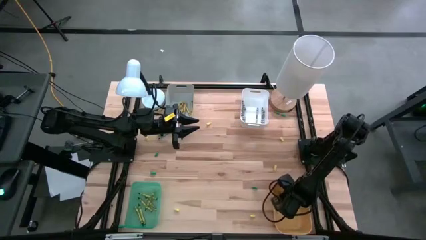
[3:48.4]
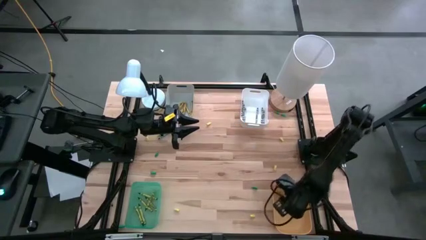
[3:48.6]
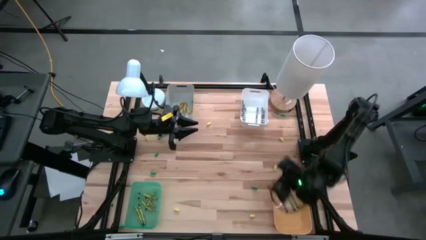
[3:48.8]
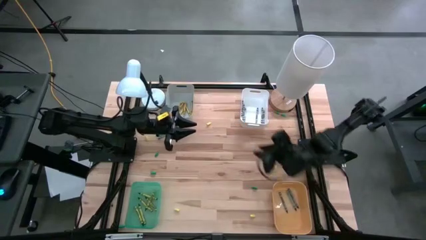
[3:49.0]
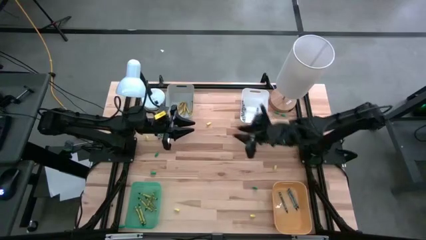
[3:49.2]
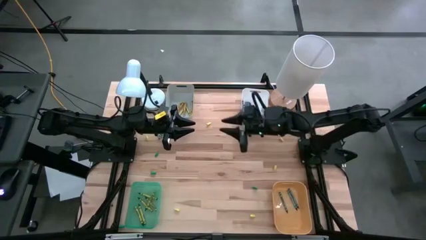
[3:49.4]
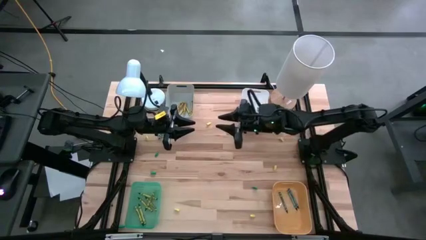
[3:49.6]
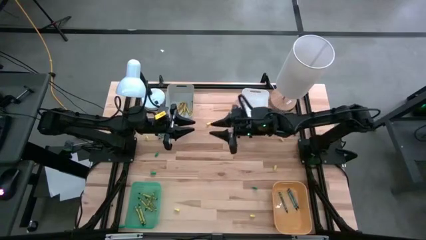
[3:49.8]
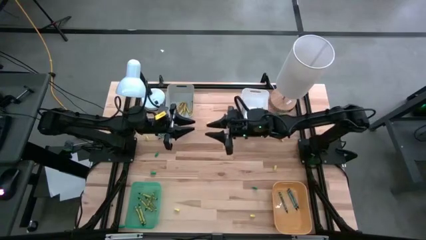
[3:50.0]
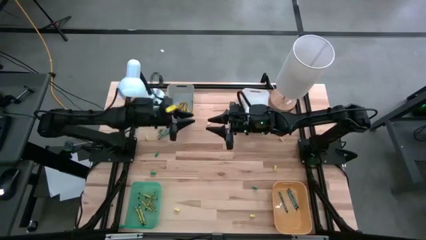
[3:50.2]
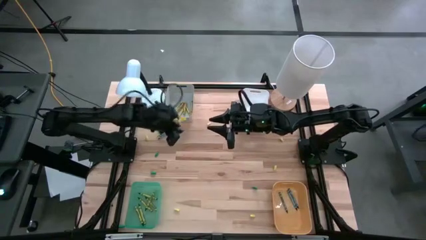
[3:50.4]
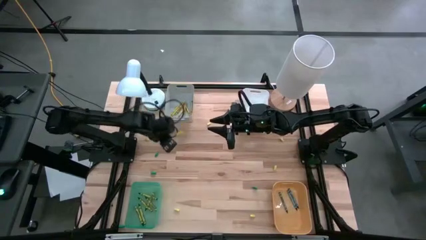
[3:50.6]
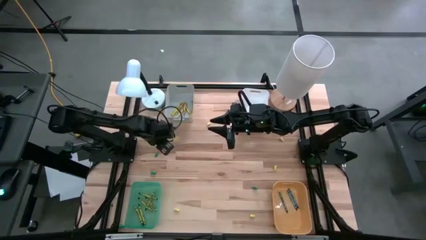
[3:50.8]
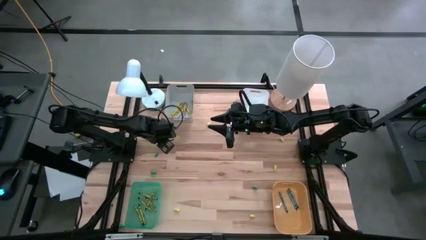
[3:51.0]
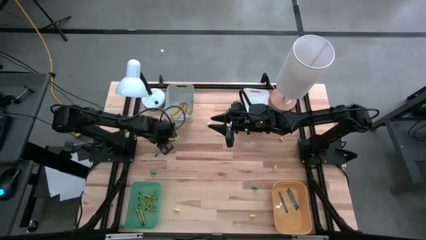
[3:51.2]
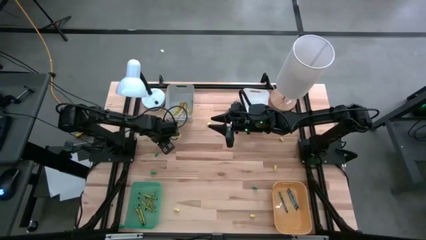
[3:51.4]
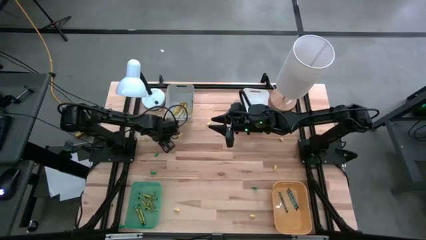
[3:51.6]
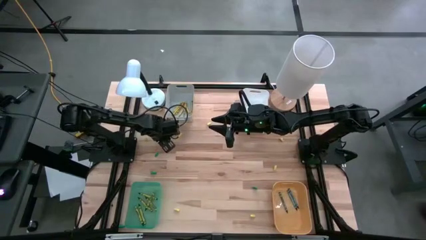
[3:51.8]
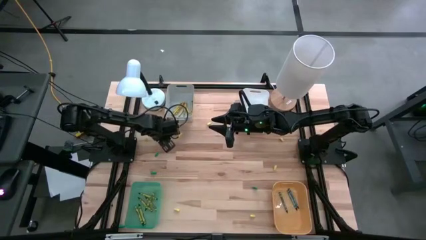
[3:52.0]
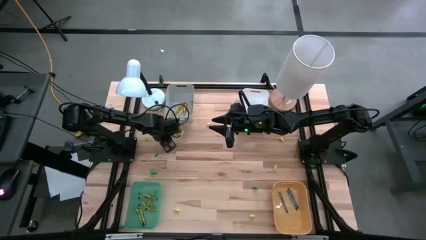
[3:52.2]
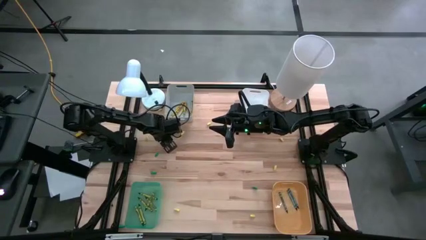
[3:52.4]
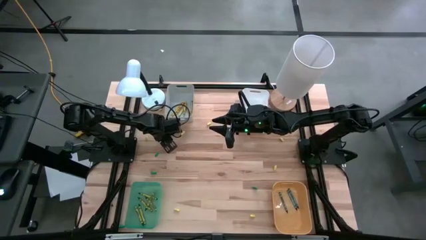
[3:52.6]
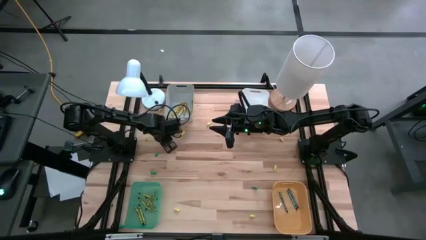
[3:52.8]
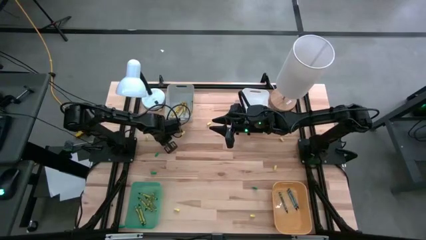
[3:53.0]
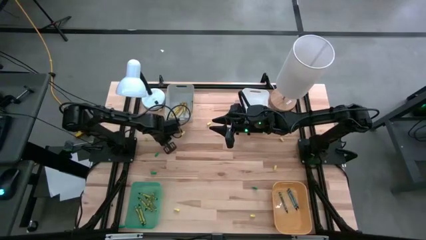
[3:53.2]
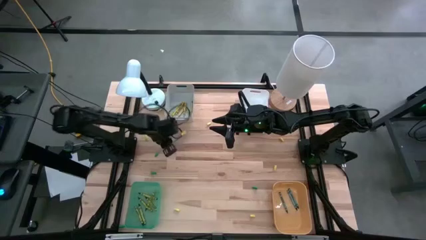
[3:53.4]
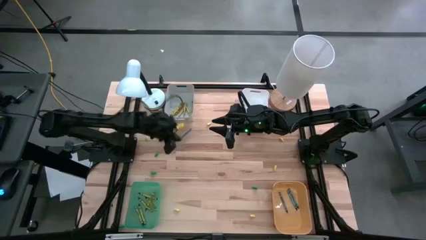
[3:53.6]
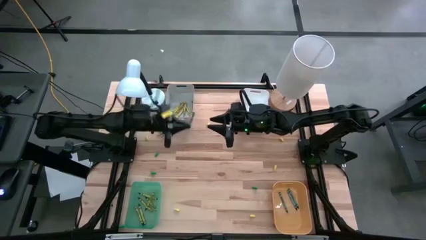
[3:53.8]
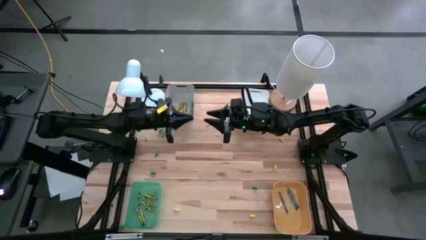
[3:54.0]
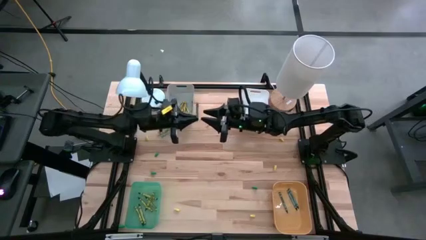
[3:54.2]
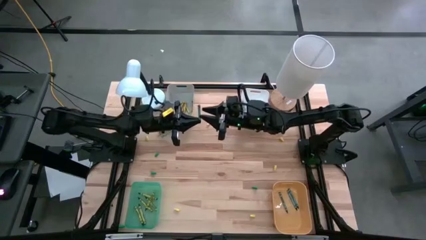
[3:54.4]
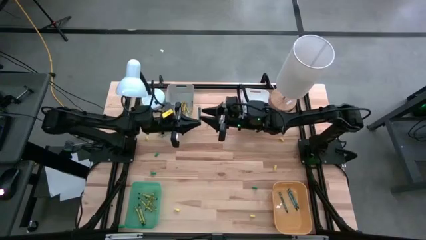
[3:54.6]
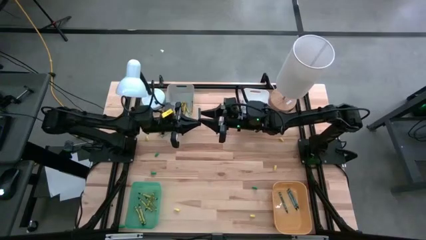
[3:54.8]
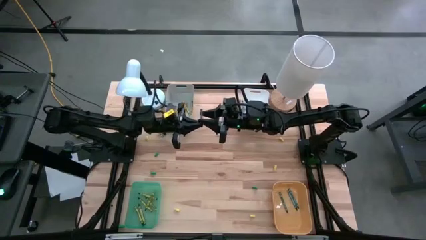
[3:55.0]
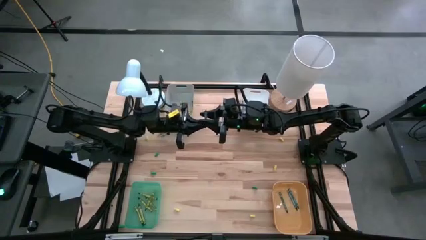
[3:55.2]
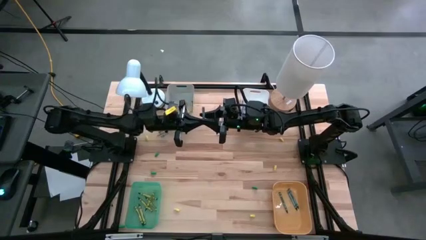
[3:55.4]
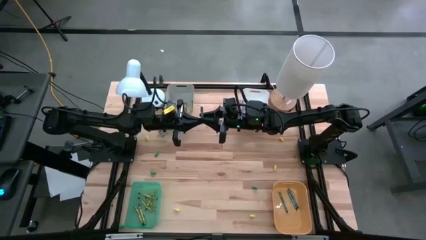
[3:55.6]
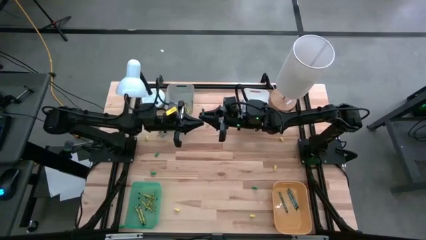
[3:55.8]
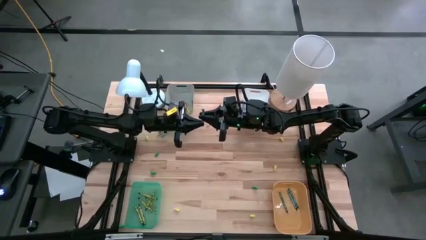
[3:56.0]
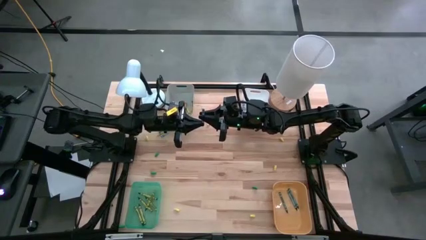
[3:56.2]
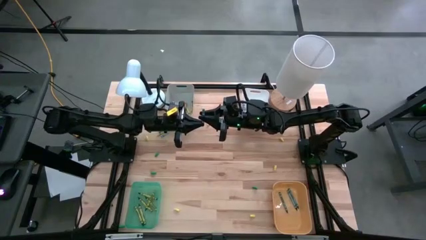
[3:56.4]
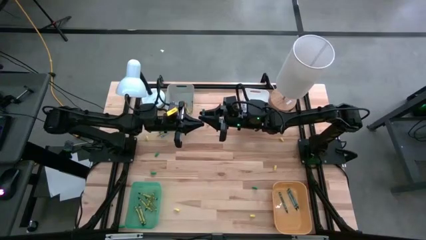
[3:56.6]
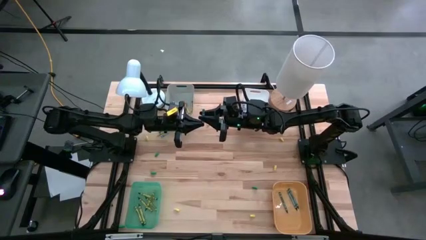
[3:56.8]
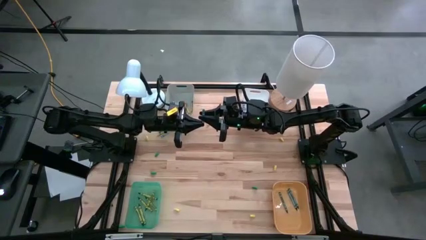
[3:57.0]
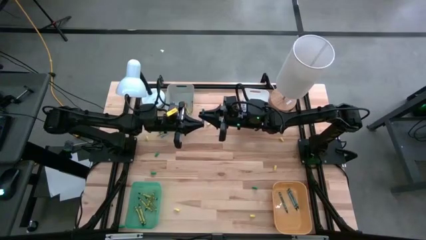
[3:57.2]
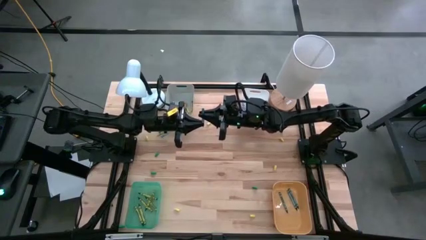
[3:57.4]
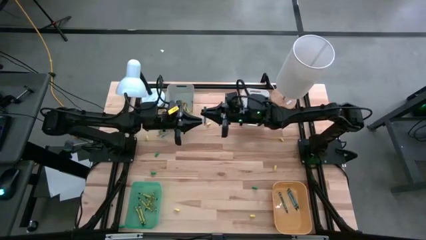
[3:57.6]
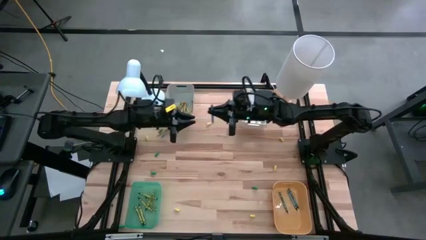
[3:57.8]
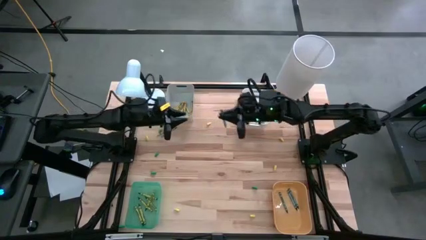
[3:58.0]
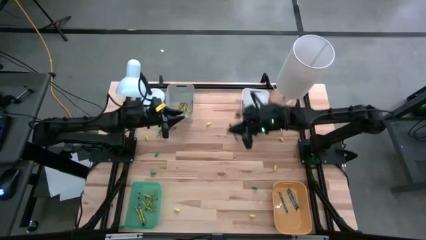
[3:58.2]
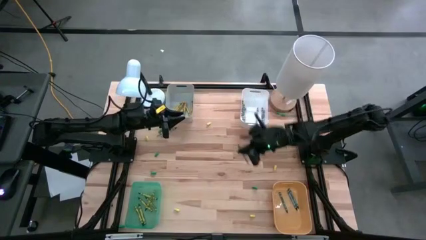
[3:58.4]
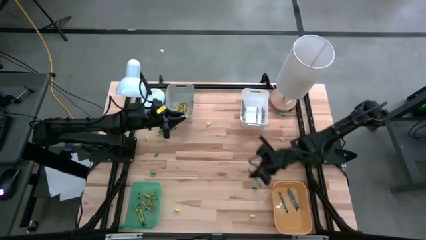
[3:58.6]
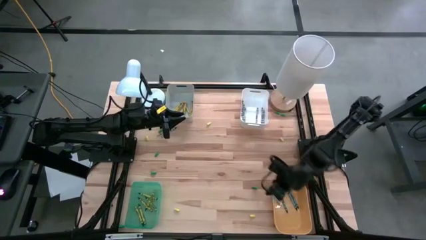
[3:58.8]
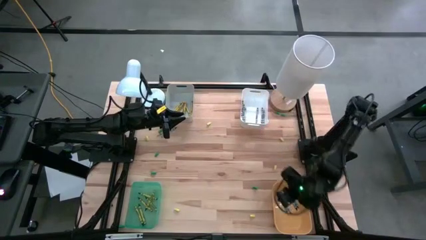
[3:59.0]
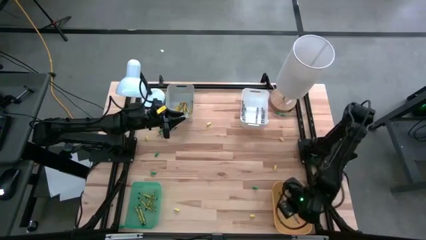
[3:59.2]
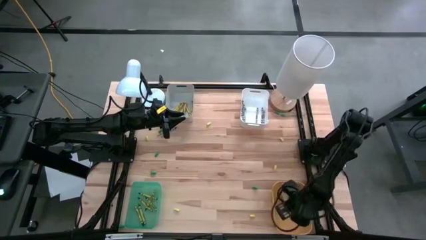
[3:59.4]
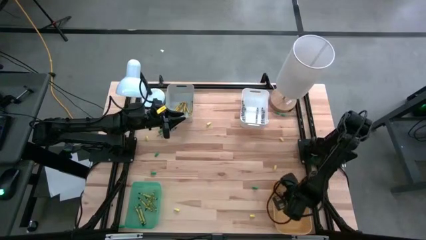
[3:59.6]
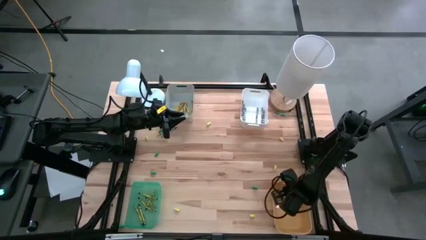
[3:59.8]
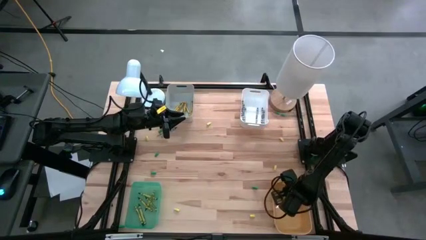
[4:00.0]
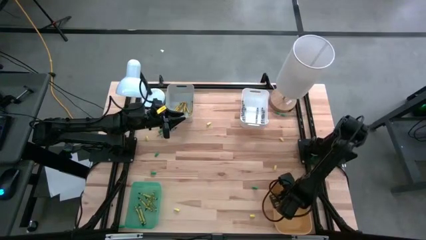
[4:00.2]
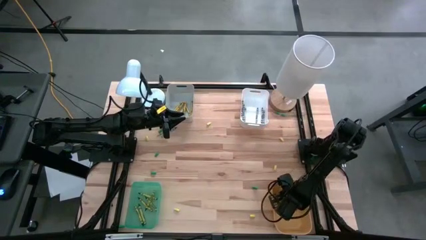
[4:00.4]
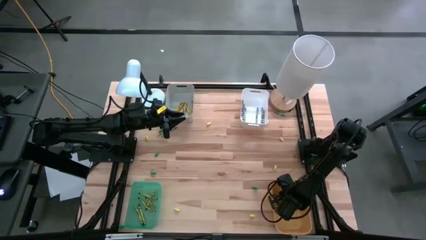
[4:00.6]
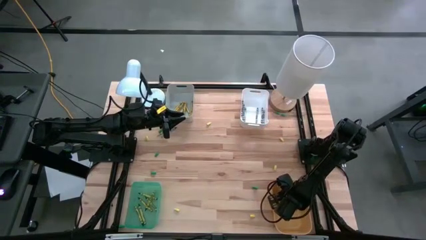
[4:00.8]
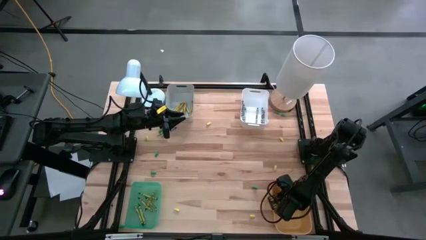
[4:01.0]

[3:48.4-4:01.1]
Task: Sort crayons
Put the blue crayon into the yellow bin
